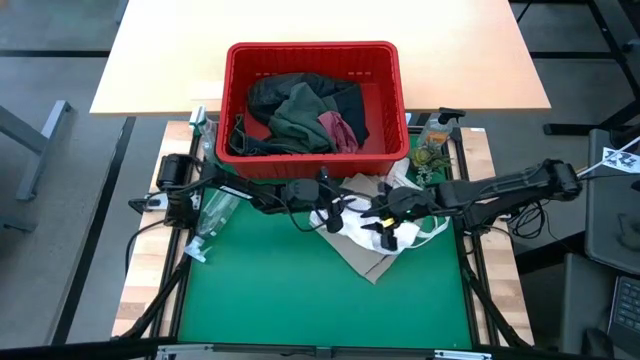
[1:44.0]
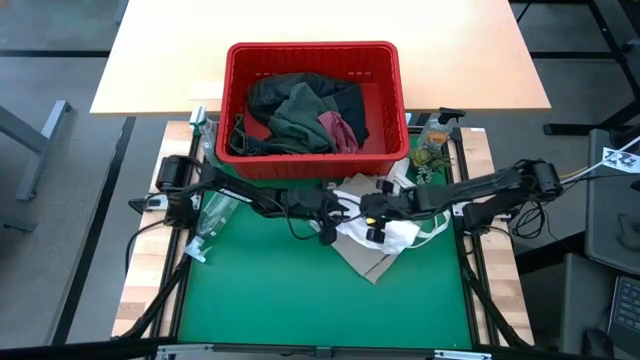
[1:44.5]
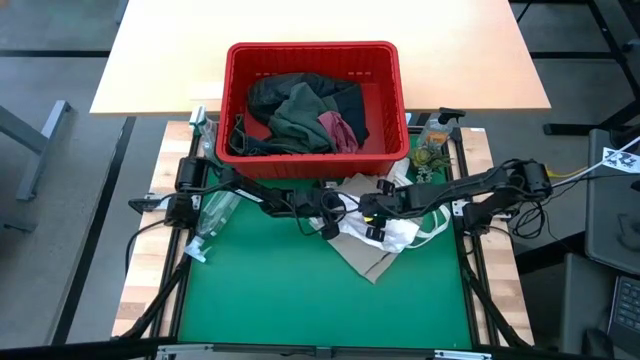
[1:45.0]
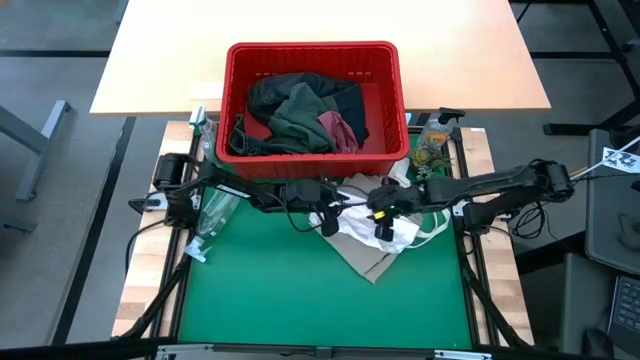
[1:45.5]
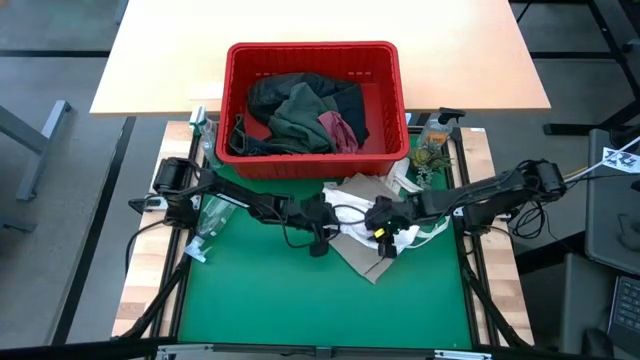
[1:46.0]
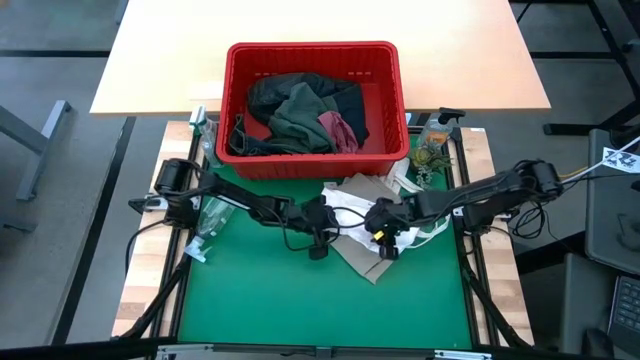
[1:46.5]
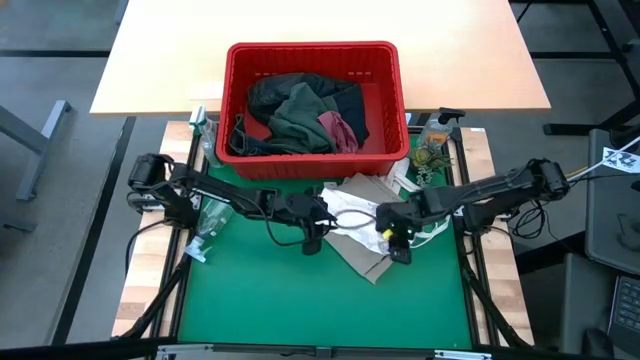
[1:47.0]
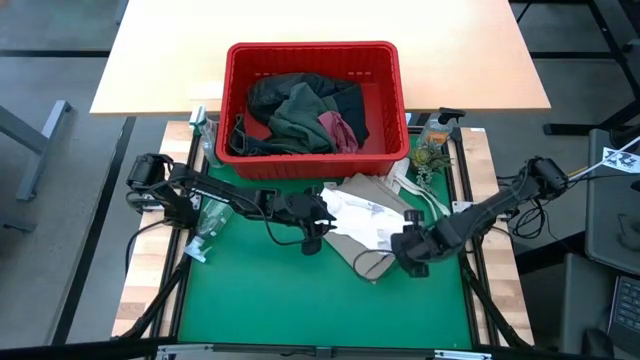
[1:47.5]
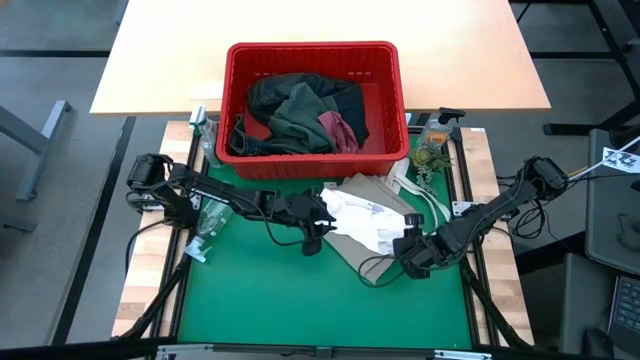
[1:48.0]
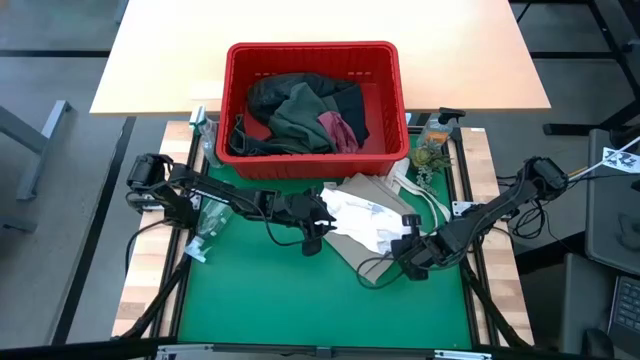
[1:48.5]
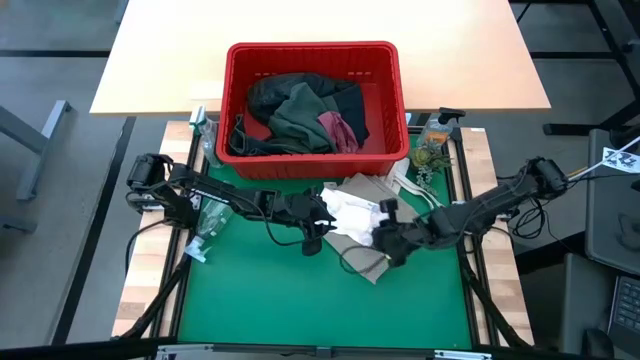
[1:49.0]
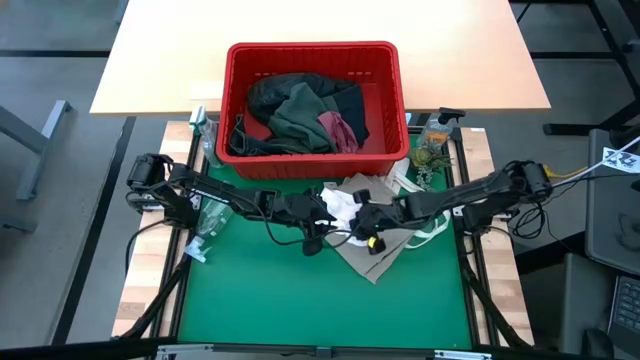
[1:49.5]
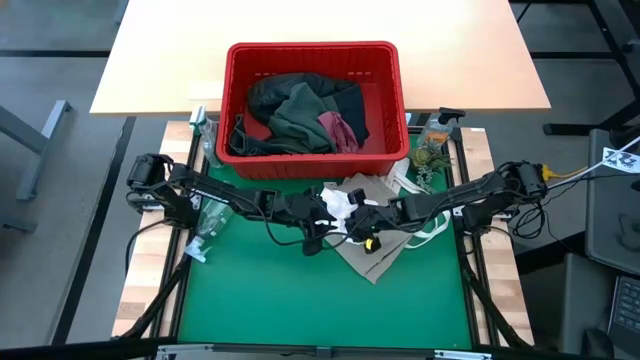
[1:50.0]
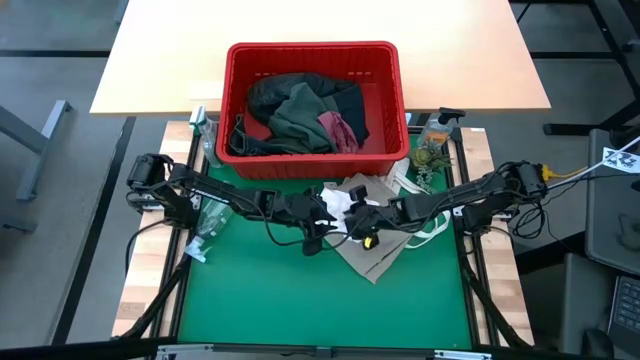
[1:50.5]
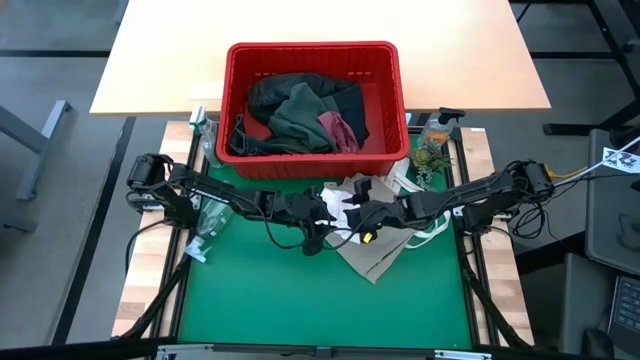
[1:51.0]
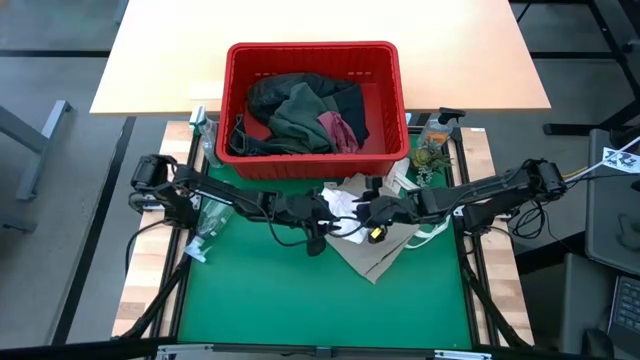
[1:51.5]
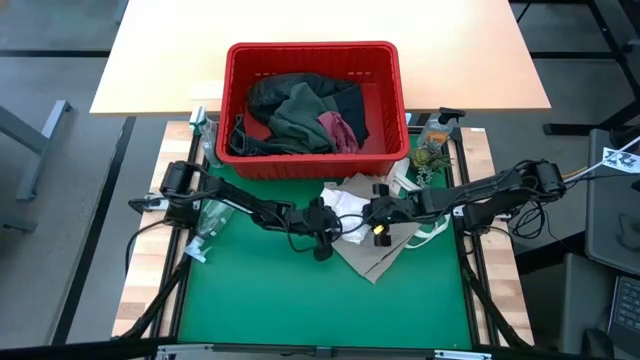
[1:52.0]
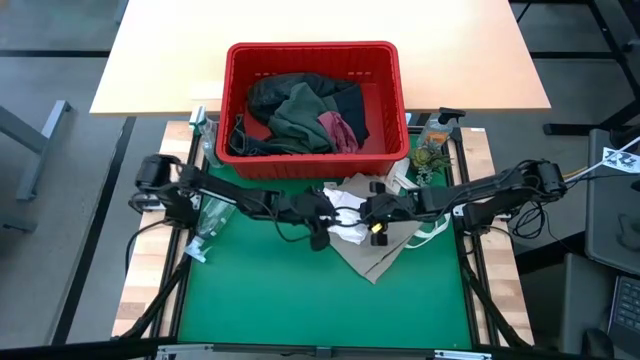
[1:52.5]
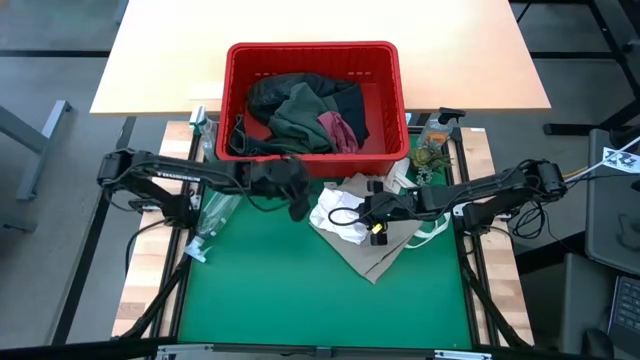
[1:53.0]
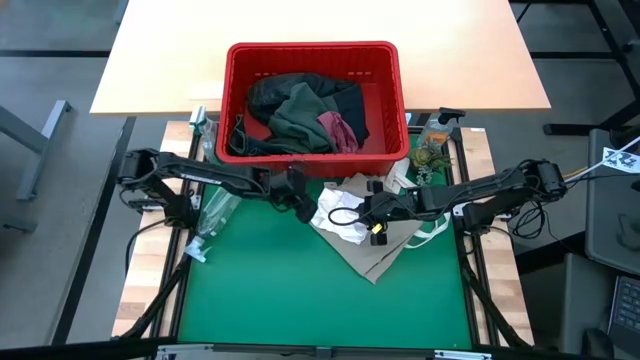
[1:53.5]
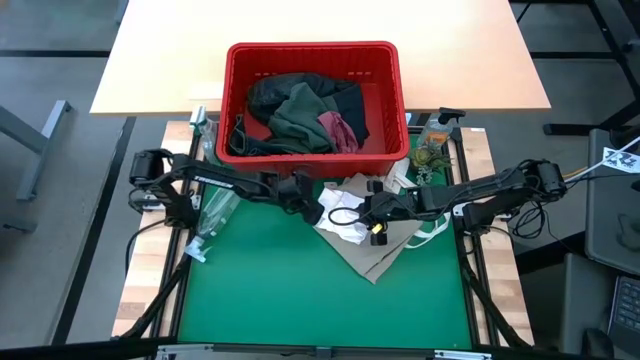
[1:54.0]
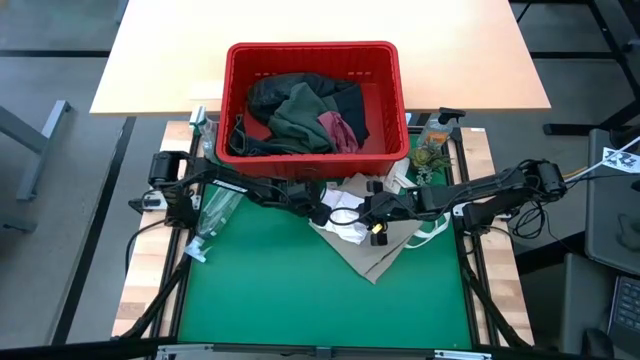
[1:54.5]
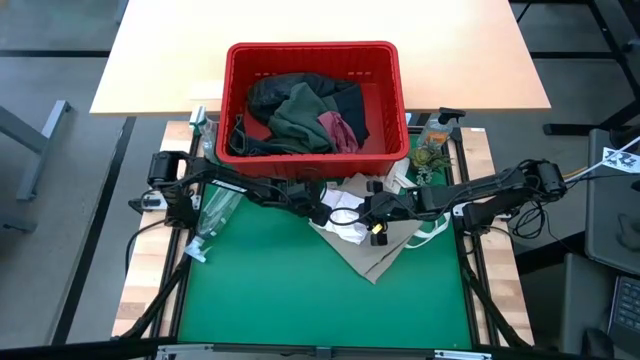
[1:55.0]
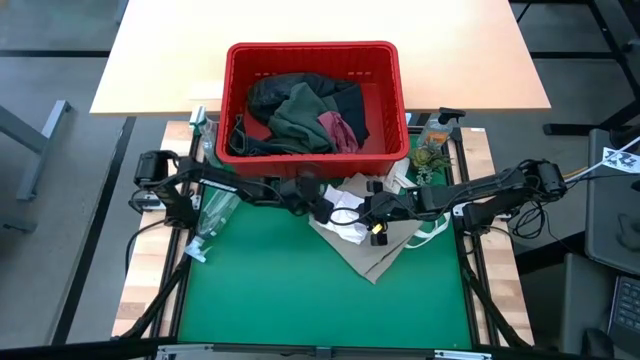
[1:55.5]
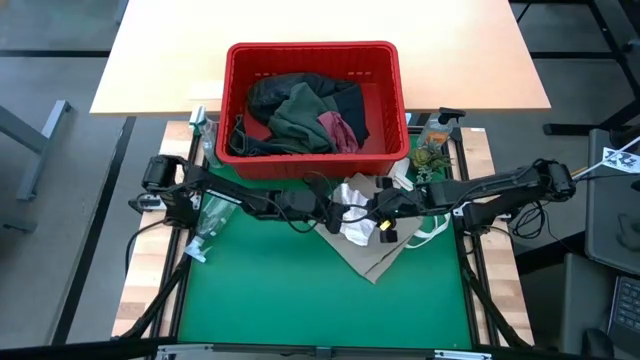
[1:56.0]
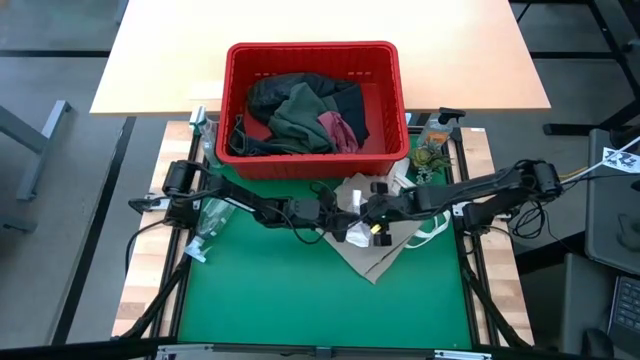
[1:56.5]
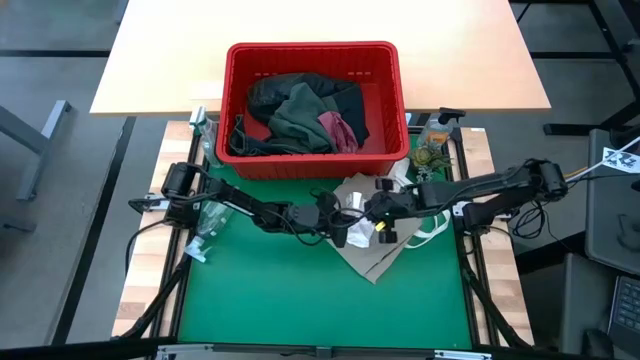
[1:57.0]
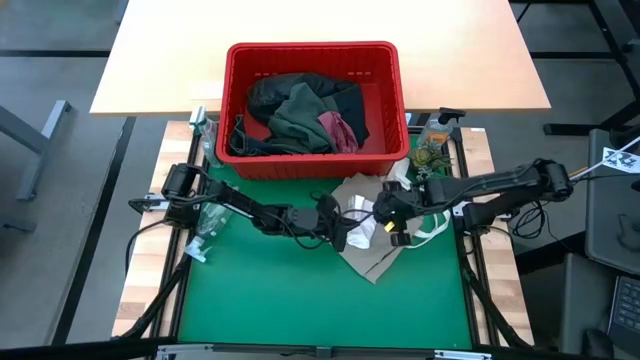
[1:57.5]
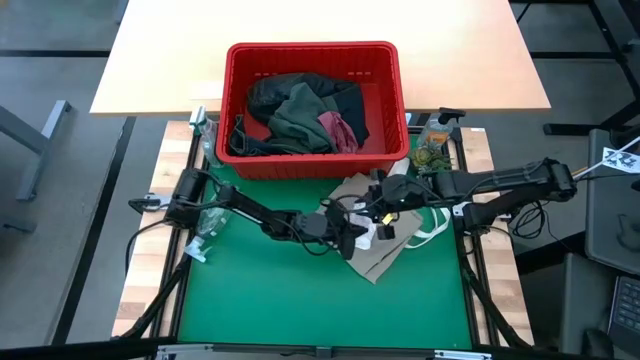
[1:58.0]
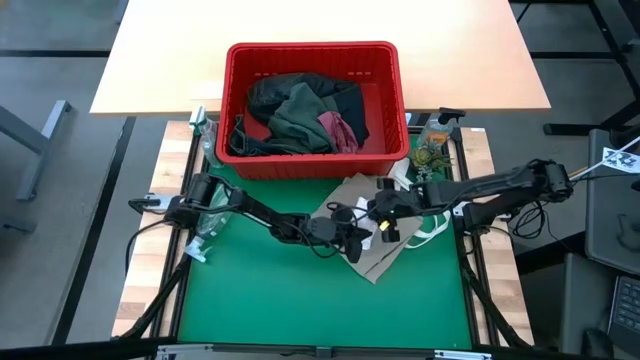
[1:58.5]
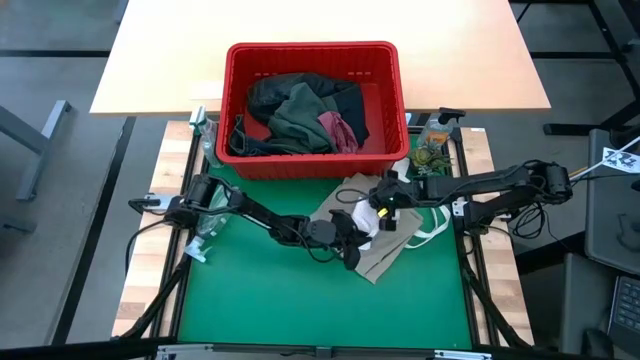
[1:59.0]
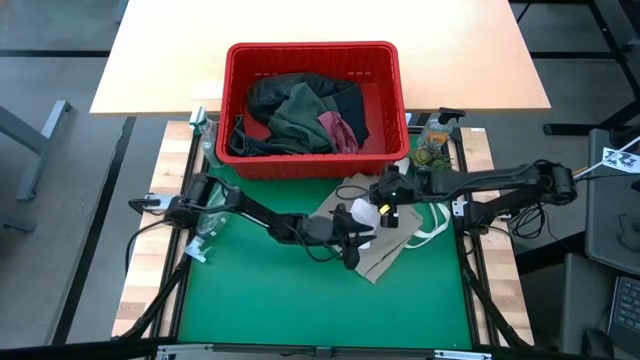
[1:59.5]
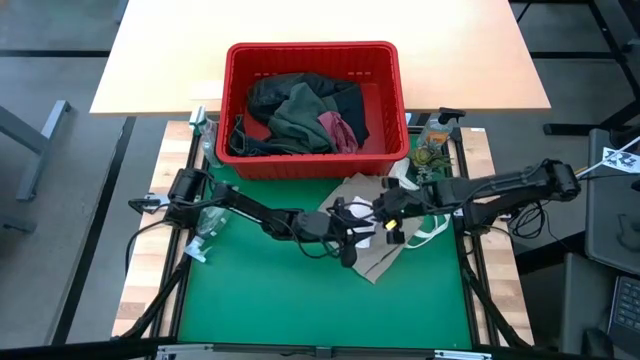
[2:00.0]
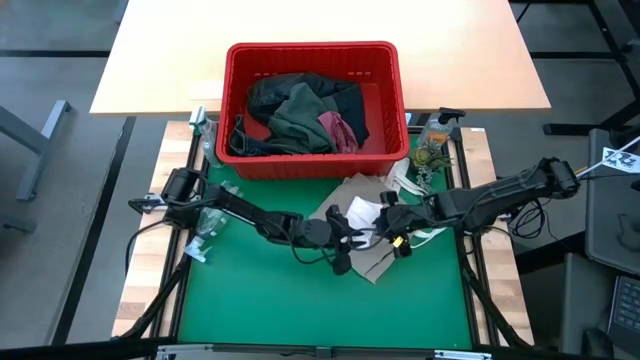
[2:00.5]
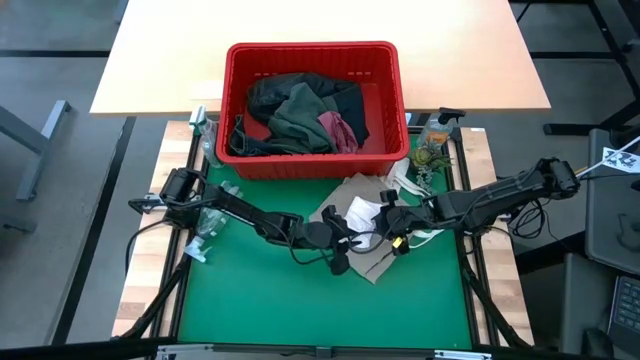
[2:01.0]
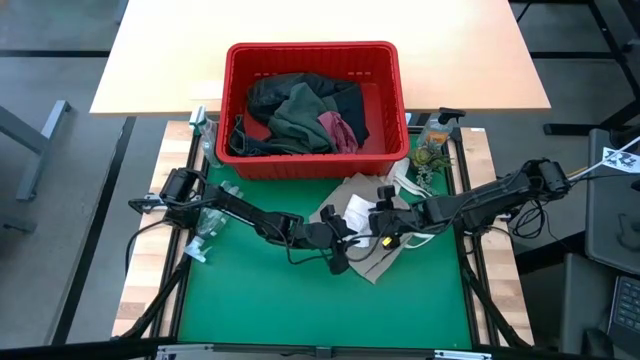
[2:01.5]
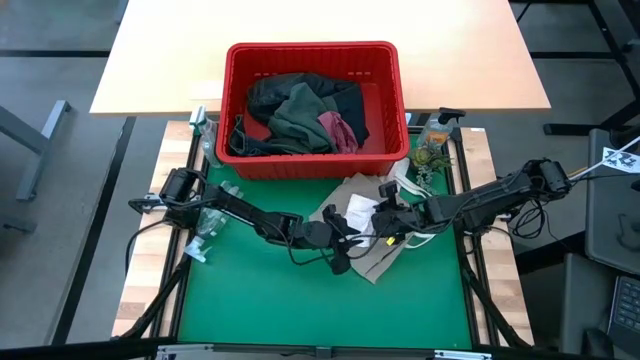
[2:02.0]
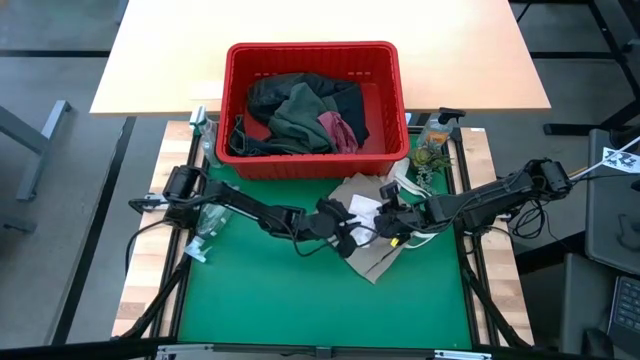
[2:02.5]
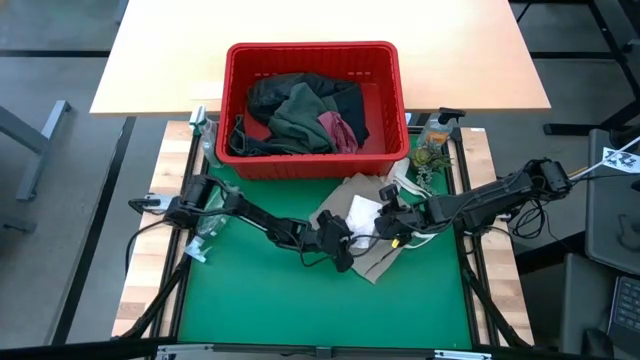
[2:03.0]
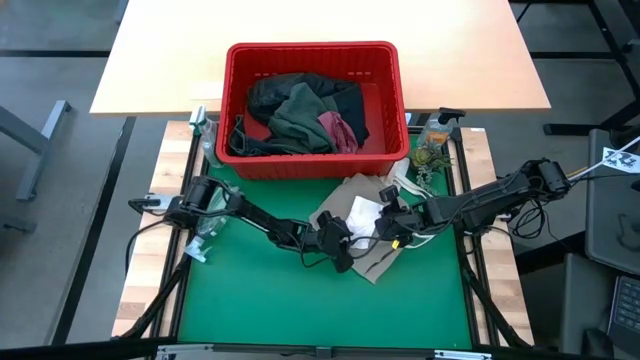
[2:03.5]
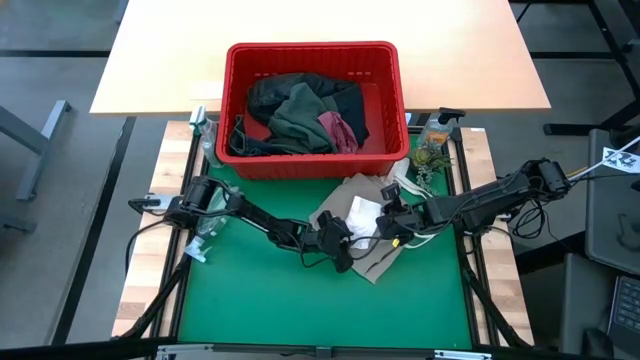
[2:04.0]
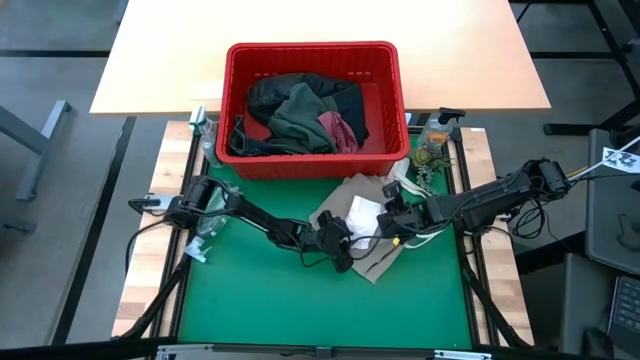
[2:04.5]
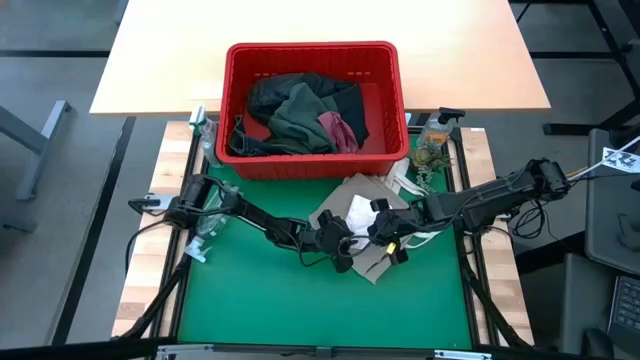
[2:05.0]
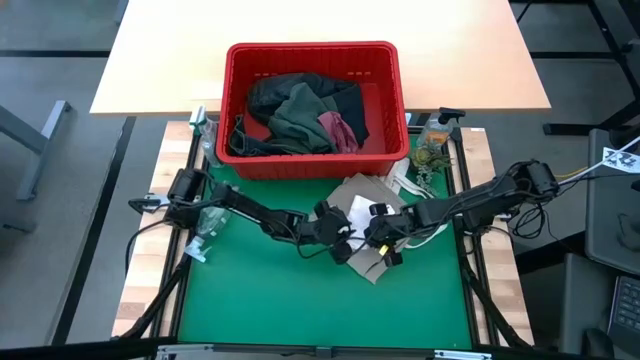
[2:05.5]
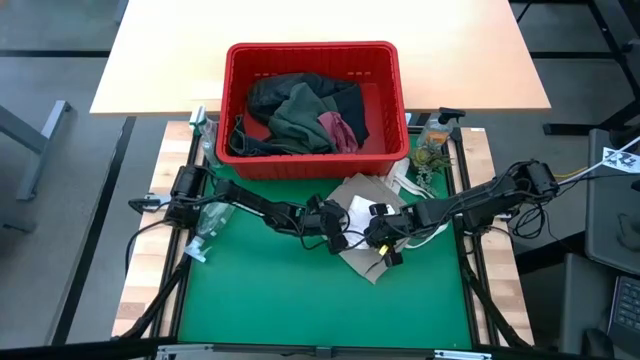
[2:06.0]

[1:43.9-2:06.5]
Task: Fold laundry
Fold the white underwear
